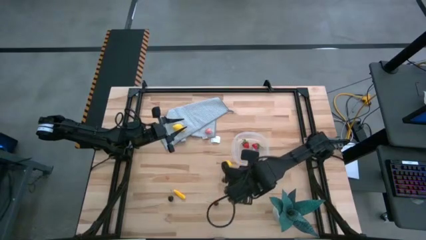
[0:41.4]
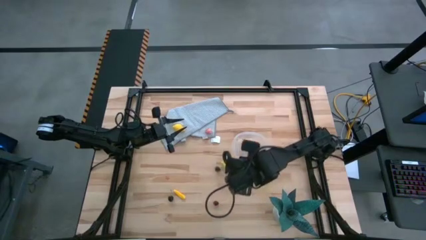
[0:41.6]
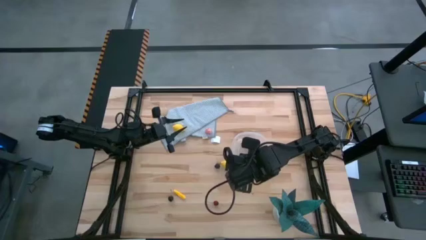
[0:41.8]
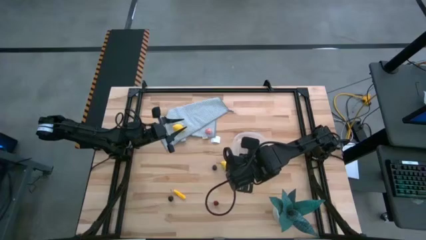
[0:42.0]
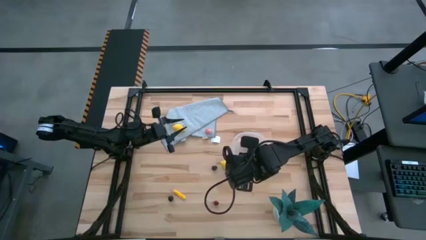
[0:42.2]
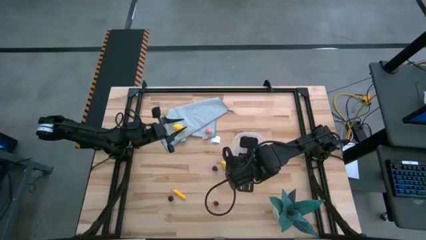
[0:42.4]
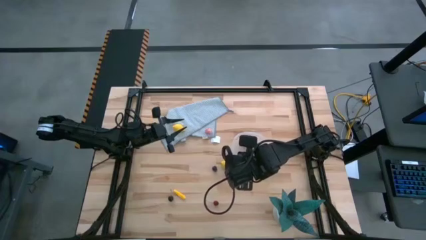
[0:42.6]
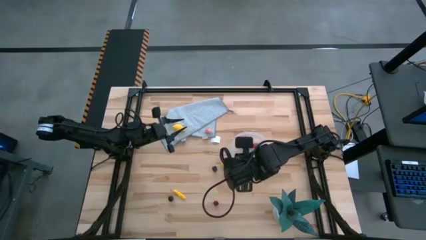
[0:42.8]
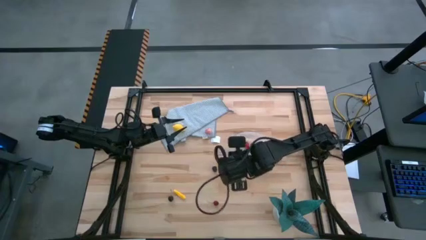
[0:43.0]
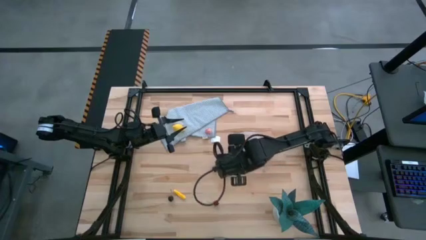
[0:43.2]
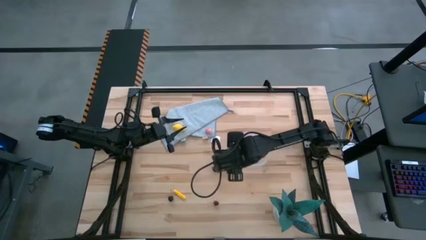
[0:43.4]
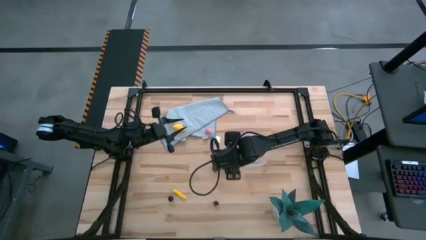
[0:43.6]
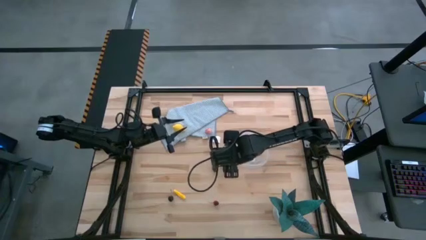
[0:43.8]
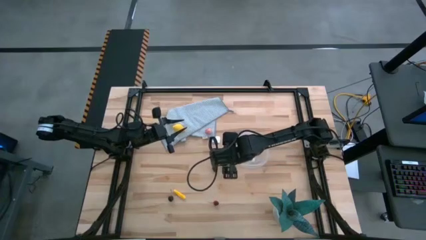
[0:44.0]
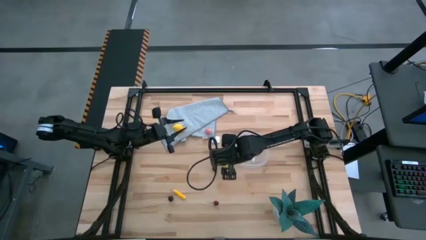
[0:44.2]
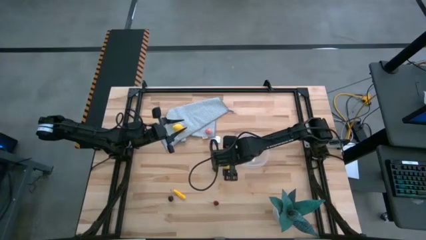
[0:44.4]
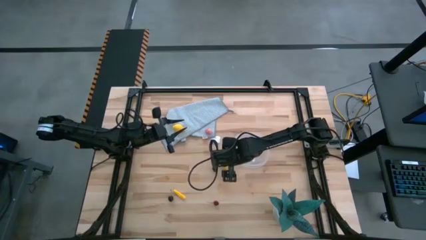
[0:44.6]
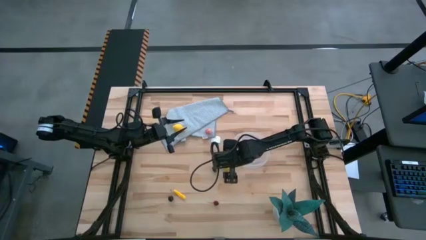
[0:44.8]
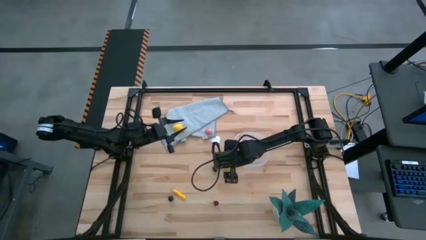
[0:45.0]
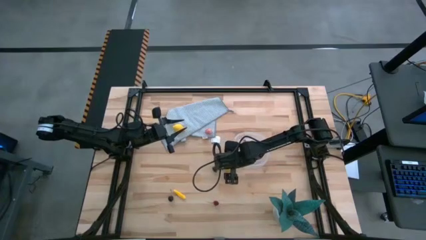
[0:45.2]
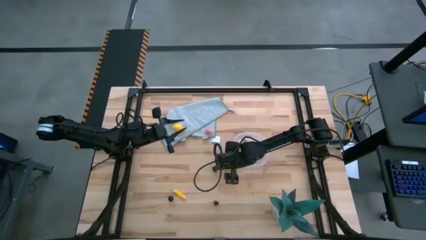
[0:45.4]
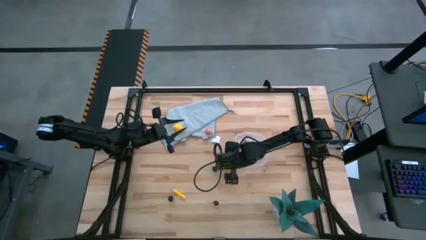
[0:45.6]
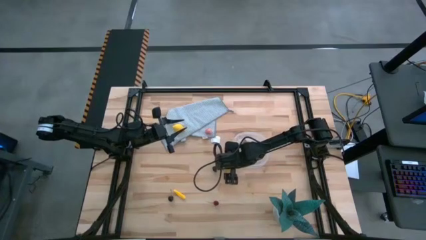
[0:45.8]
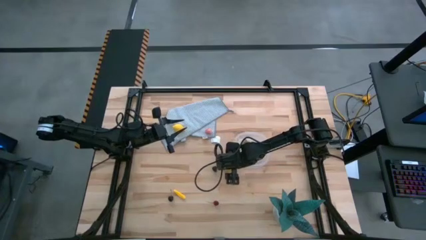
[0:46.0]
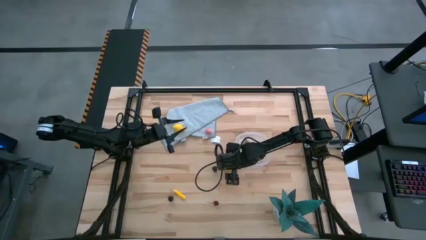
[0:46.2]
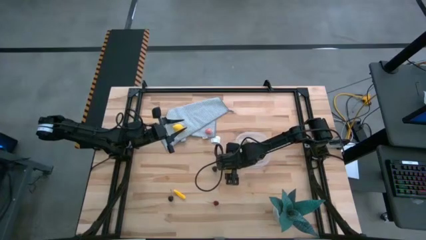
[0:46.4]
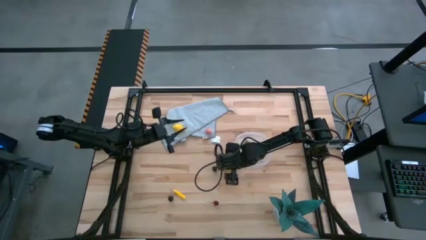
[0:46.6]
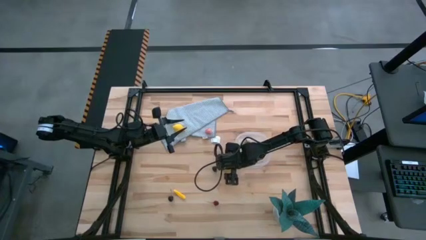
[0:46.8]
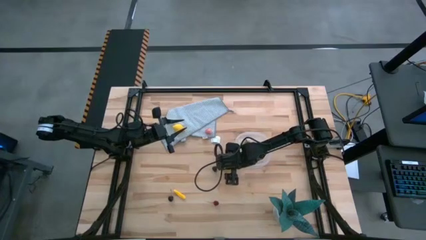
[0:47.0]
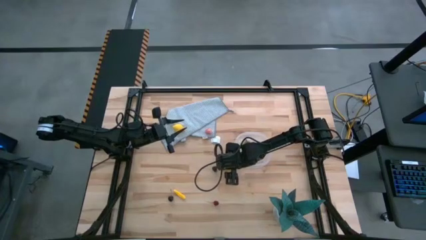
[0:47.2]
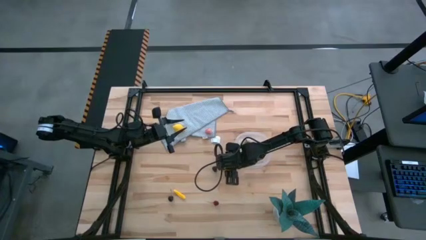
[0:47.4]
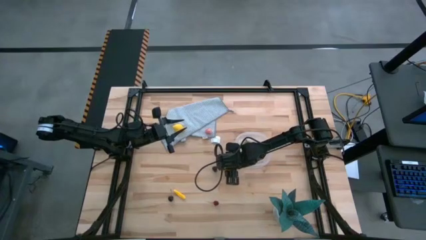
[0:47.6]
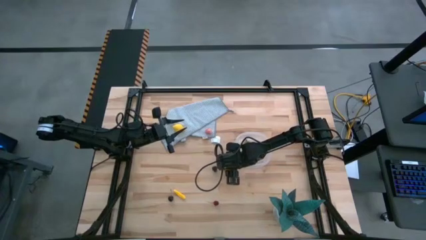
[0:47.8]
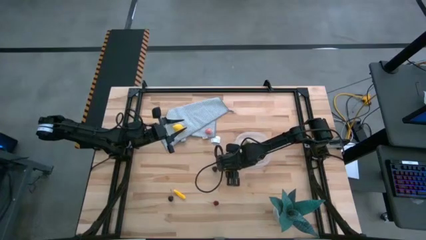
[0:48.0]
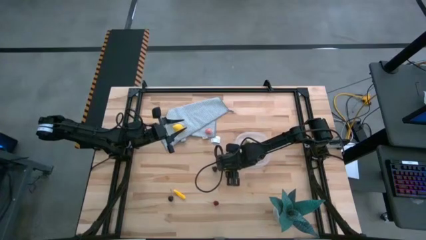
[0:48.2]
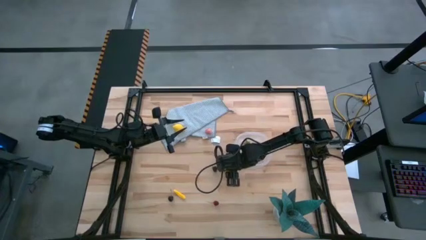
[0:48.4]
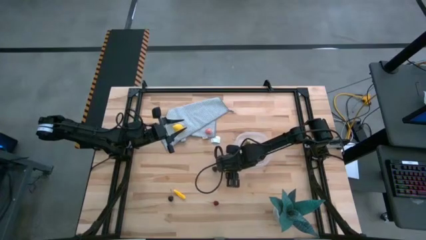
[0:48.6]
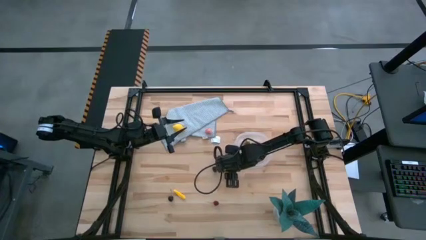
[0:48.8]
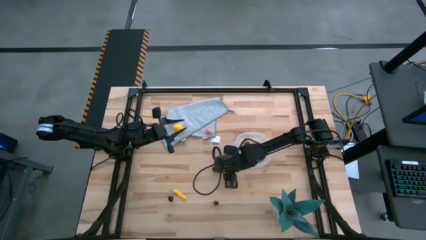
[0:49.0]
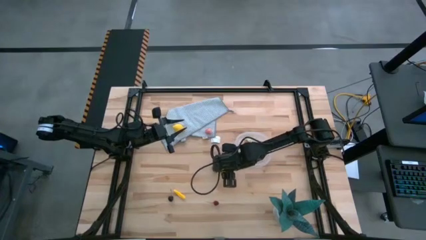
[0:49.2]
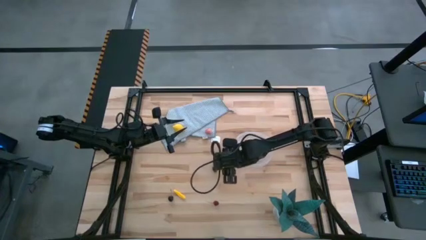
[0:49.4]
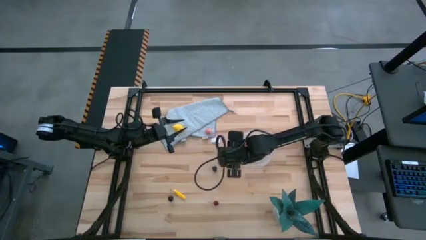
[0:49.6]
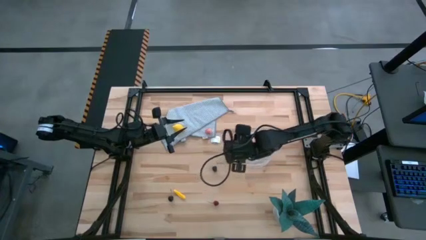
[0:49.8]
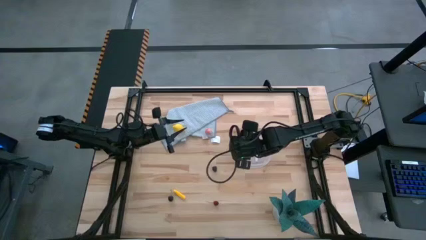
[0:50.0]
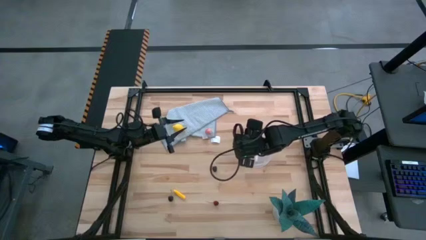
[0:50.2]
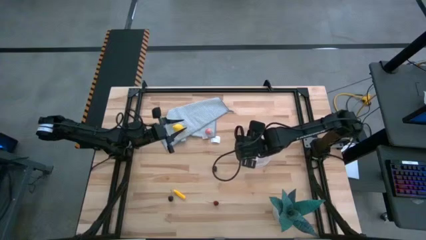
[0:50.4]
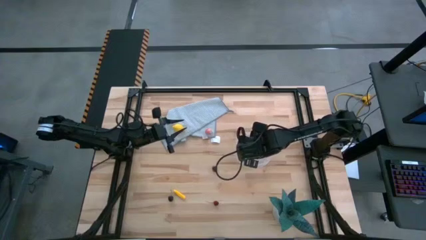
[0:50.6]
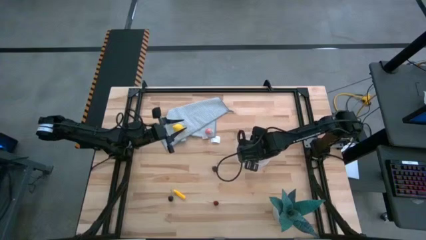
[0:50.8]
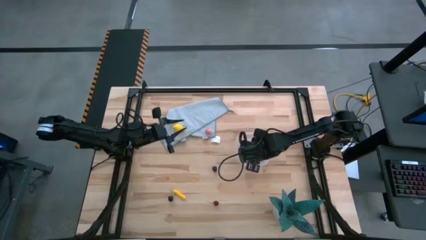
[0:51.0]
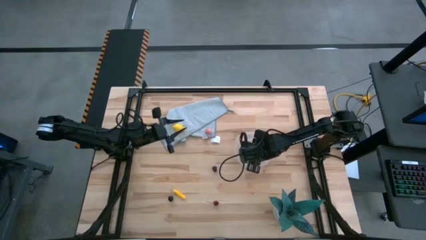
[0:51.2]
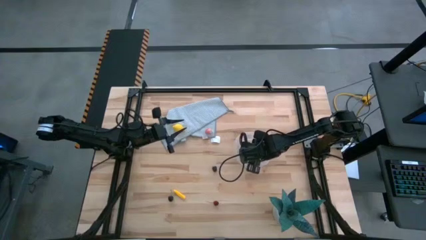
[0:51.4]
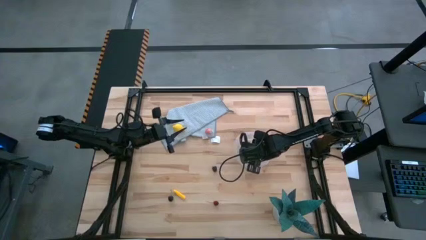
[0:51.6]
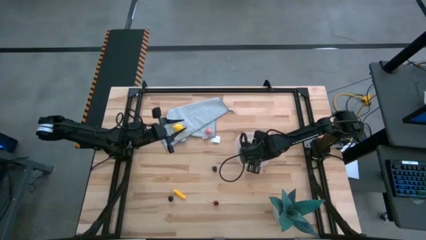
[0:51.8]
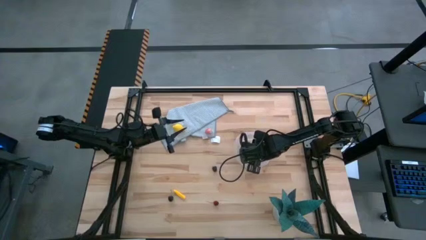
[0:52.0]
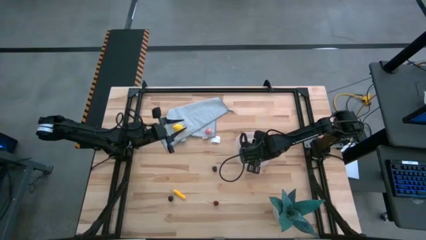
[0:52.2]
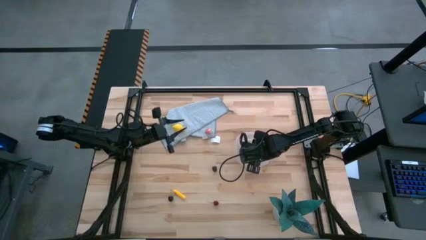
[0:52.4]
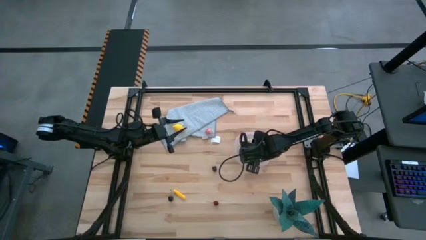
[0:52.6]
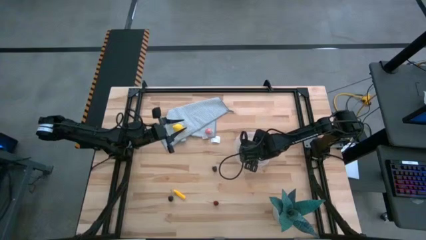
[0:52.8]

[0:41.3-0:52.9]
Task: Pick and placing Produce into tupperware
Put the bottom lemon into the transparent container
